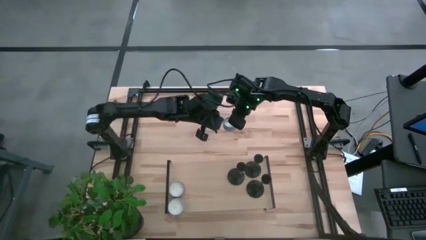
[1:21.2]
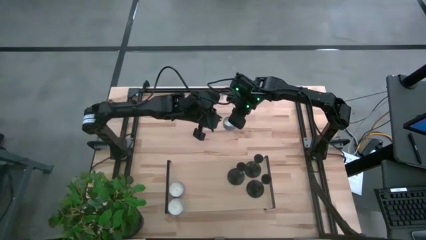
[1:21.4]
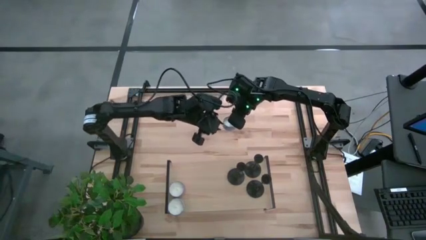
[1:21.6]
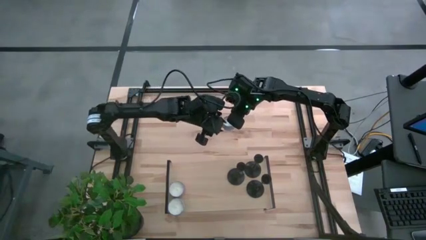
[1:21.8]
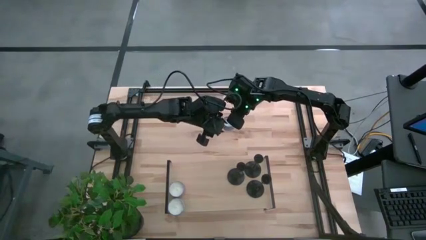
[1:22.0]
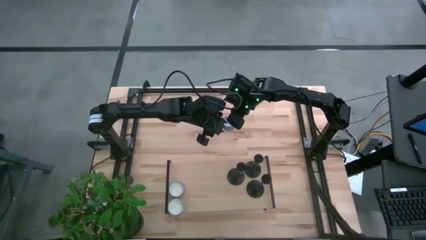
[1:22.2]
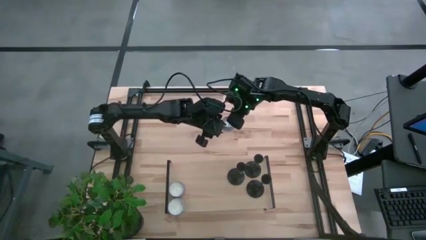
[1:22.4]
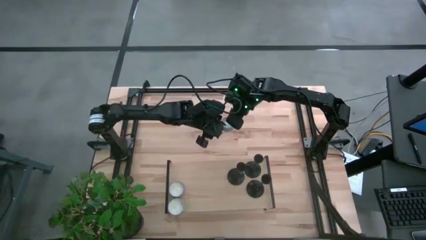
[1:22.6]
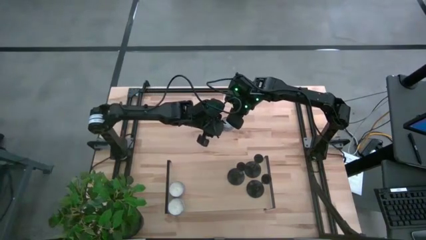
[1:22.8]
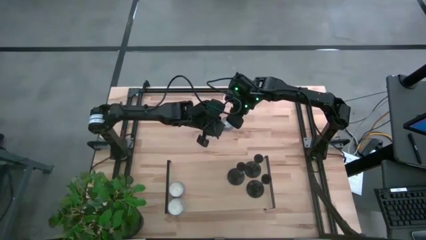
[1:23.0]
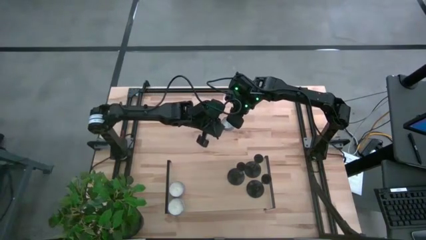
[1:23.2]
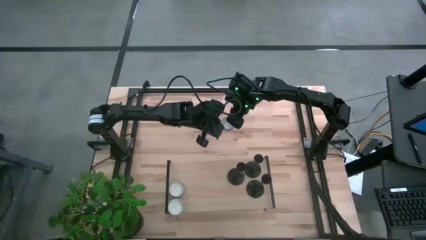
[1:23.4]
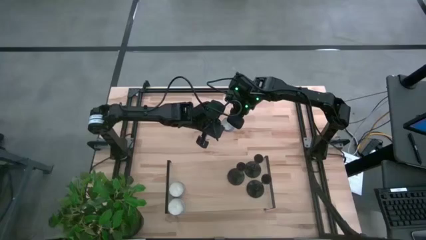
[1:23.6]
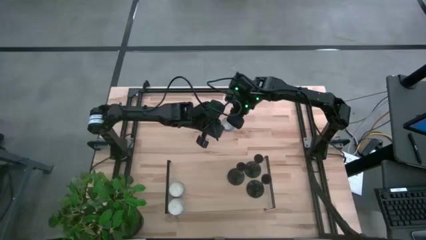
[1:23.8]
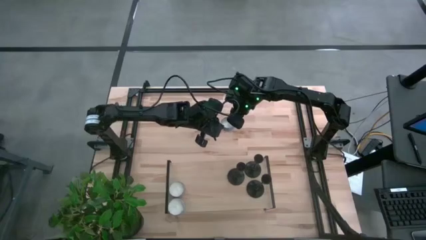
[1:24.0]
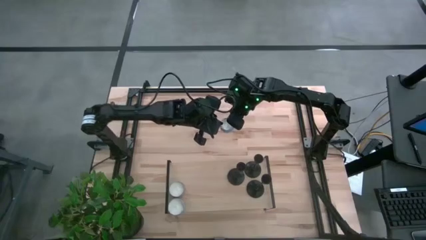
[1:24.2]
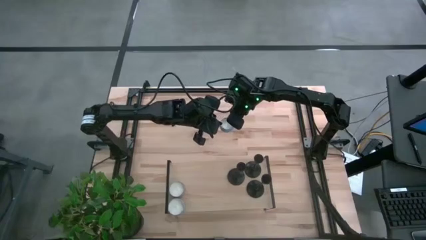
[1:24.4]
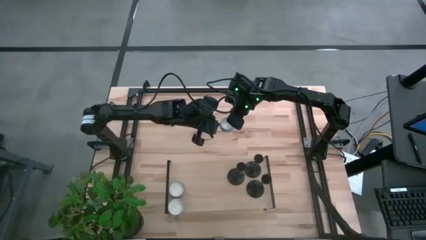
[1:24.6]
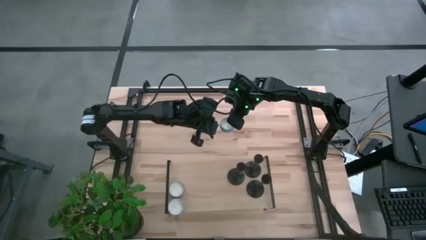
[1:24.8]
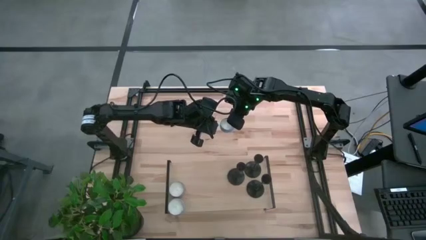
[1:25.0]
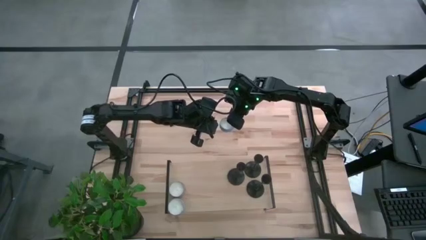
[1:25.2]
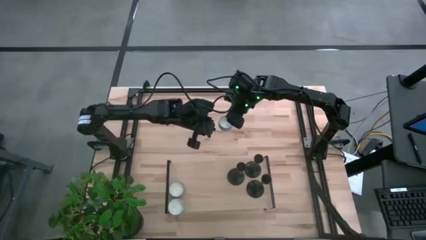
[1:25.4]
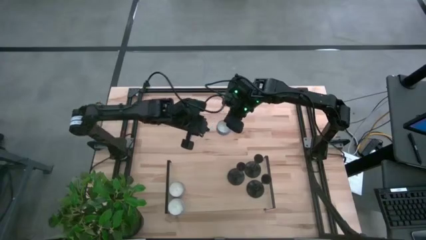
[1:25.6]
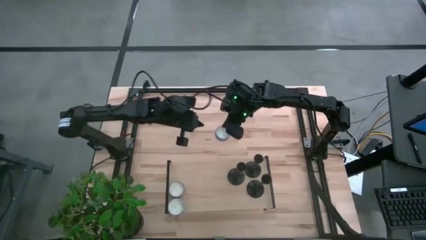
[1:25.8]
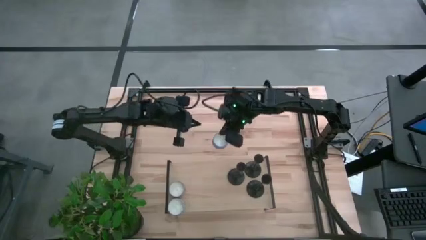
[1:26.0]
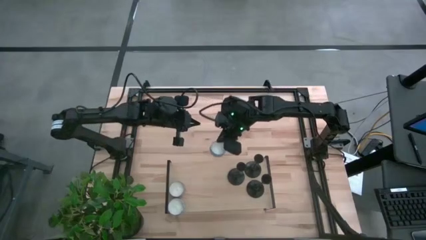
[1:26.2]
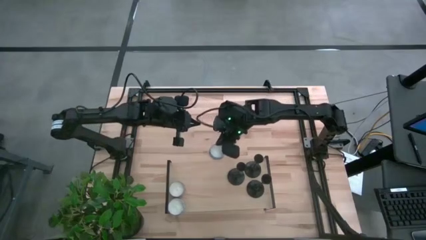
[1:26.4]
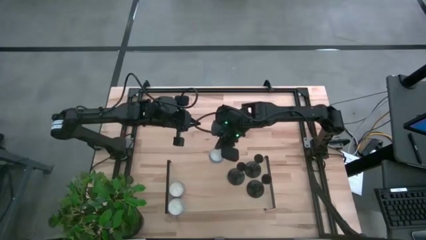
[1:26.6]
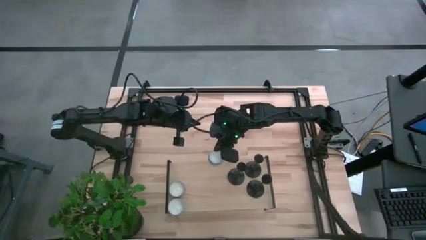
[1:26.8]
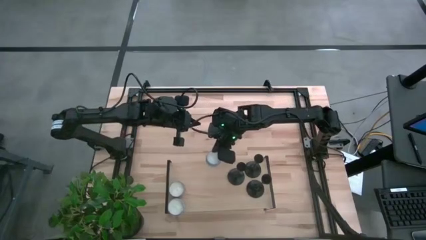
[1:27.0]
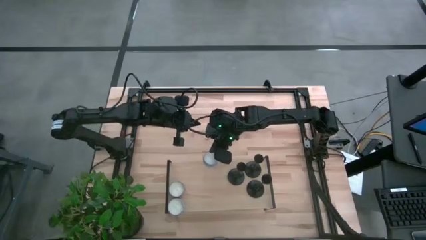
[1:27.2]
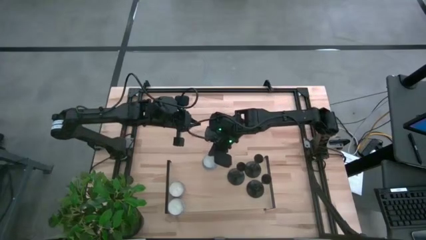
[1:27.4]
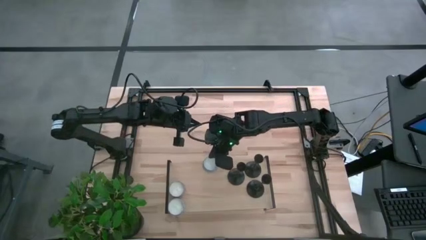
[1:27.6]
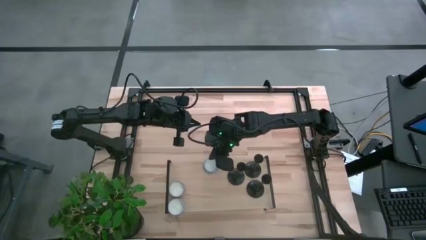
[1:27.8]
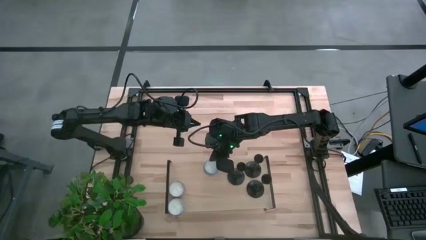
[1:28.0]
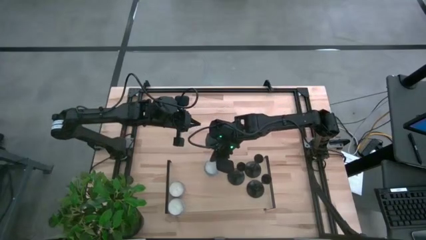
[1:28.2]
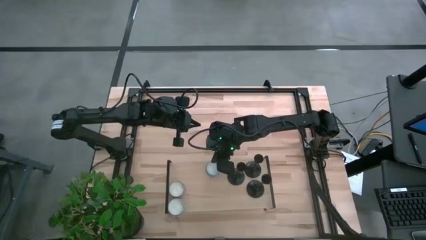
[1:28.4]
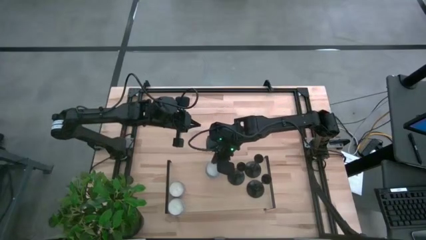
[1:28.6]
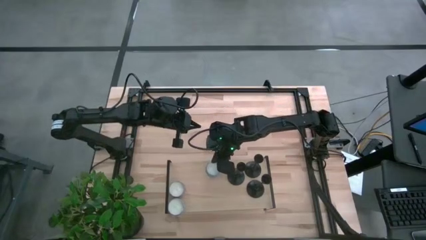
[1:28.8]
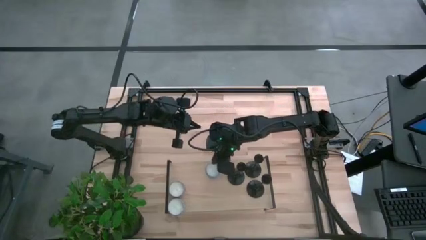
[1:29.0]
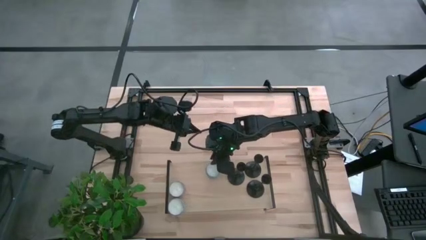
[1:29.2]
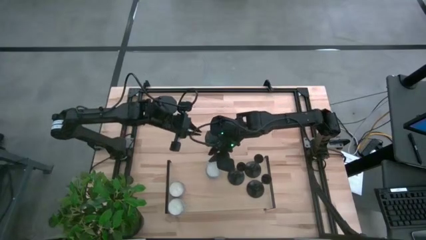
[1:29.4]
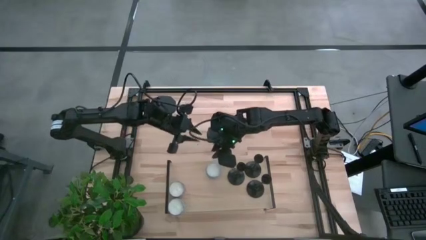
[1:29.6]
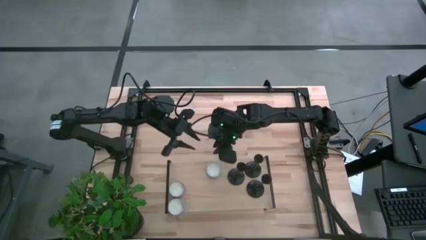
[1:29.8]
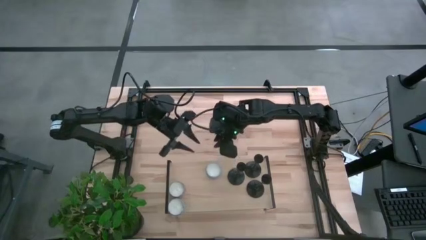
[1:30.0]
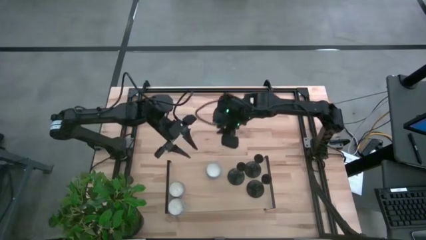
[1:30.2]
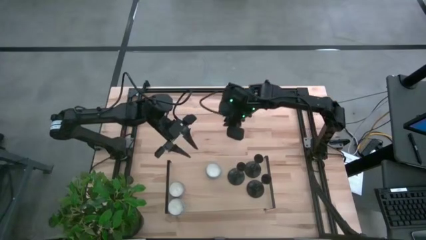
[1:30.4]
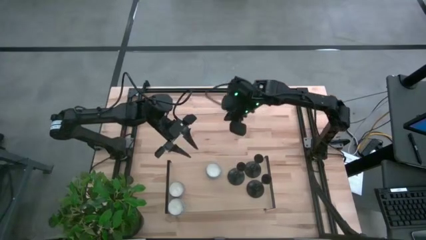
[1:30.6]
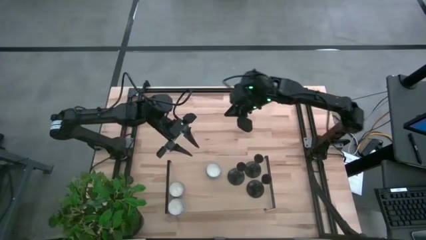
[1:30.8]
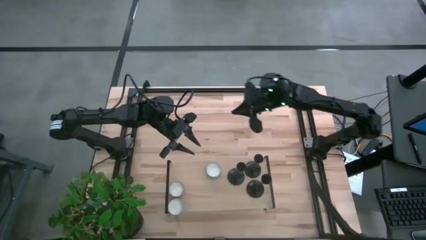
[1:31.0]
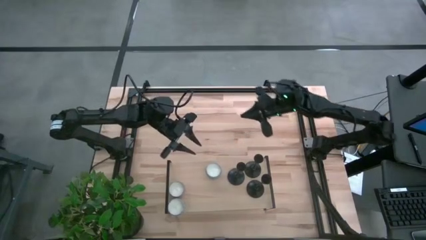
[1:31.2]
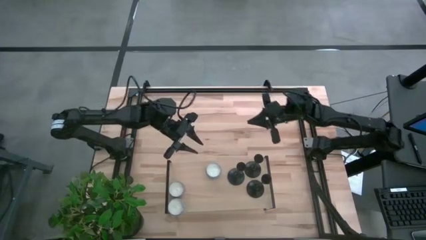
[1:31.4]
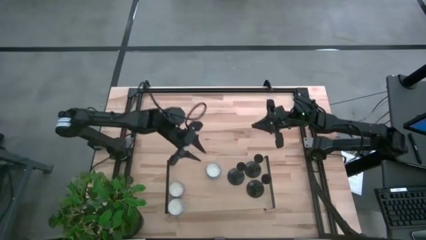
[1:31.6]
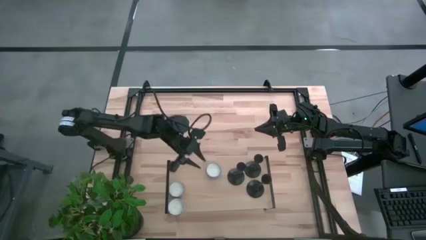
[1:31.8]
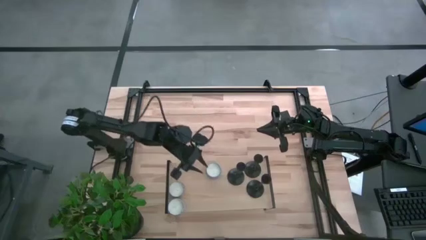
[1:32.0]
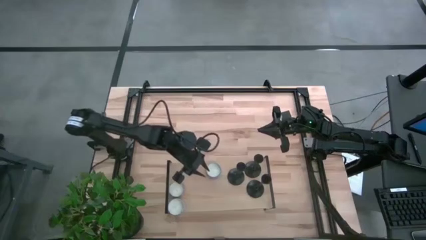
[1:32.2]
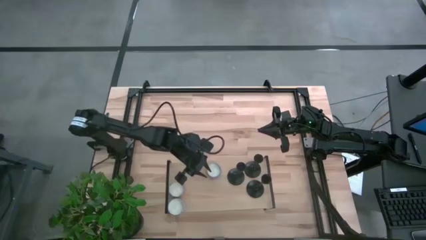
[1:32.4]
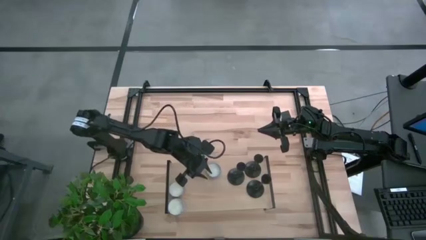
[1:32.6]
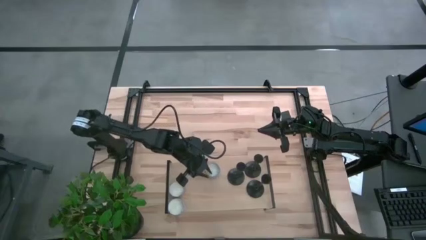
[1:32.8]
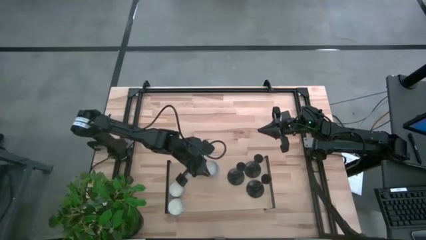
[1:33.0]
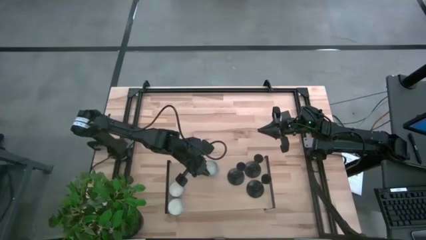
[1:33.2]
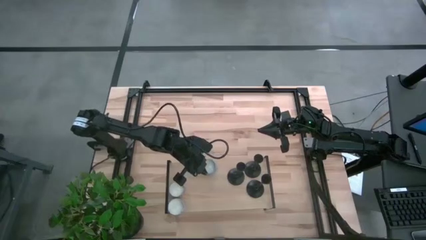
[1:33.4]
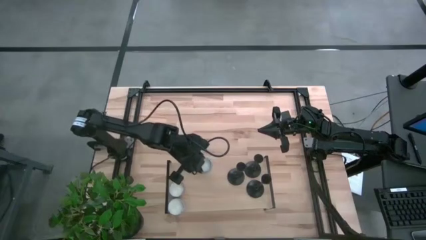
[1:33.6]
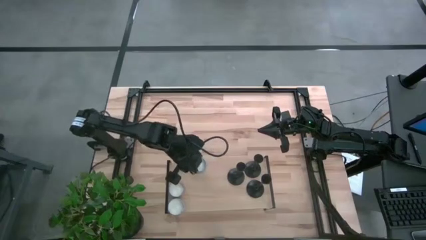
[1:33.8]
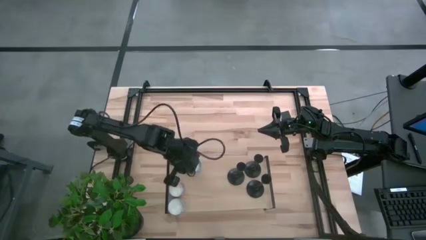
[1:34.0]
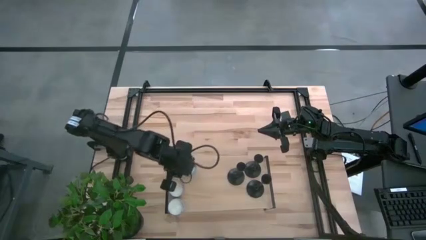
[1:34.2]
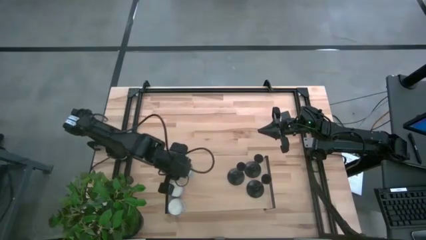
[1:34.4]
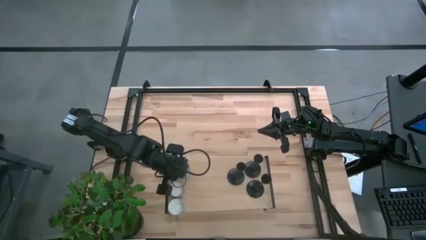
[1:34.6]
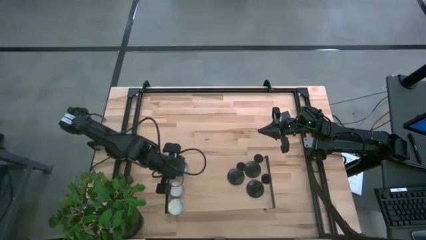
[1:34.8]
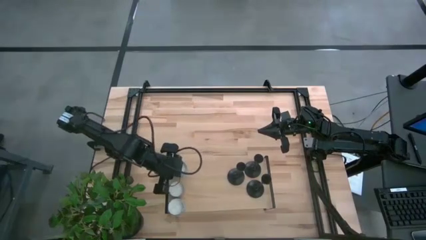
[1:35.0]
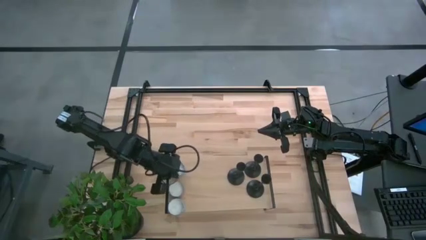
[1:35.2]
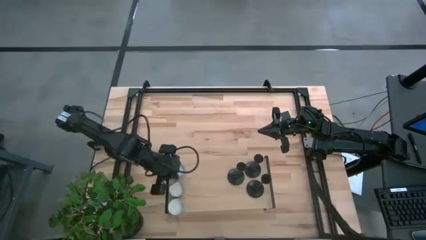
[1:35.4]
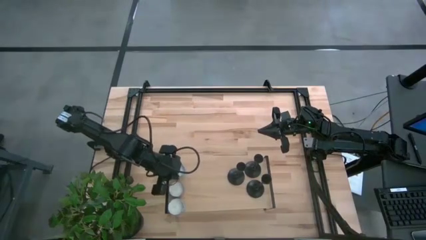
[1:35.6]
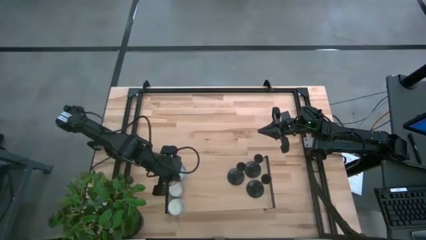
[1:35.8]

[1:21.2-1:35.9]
Task: Pick & Place candle stick holders
Put the scented candle on the shelf

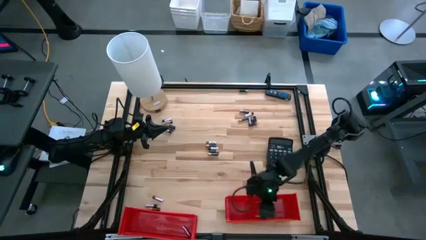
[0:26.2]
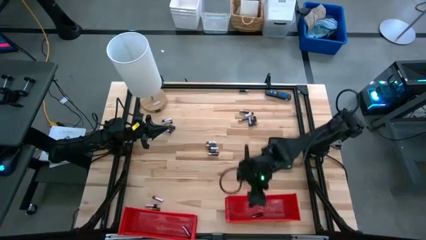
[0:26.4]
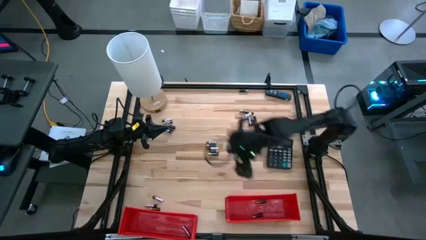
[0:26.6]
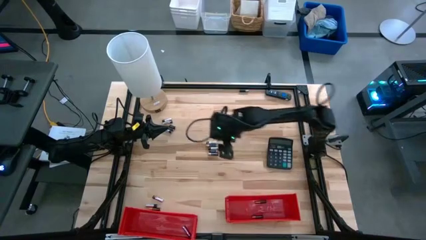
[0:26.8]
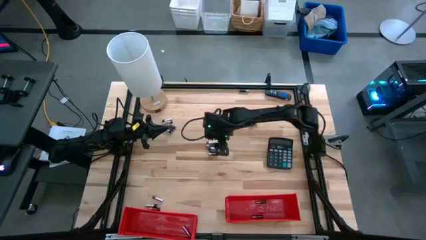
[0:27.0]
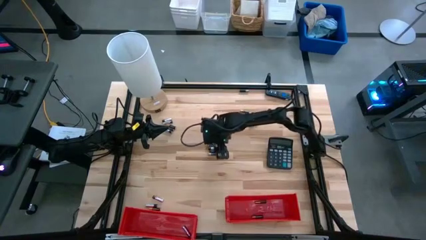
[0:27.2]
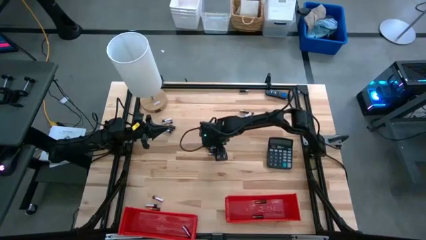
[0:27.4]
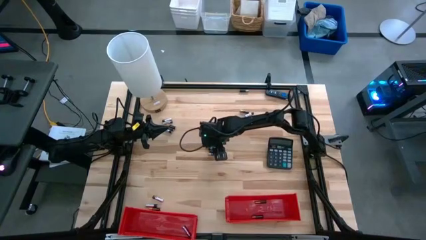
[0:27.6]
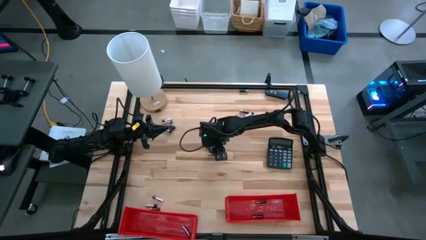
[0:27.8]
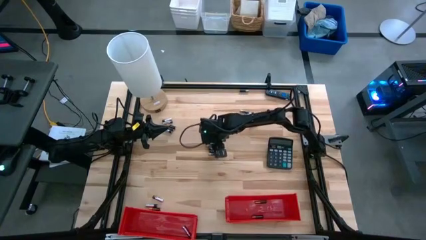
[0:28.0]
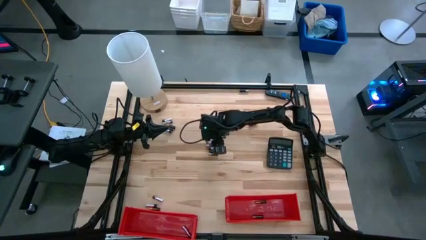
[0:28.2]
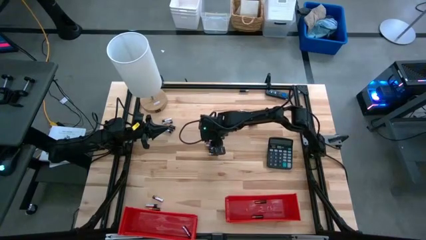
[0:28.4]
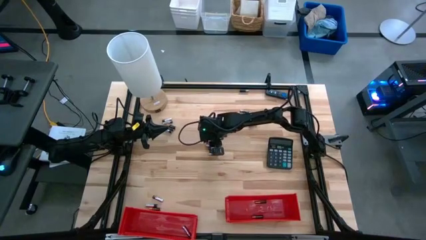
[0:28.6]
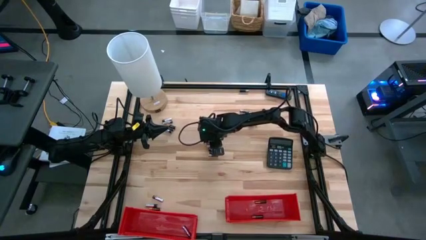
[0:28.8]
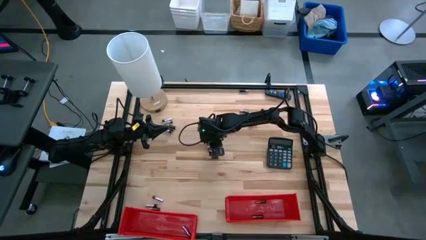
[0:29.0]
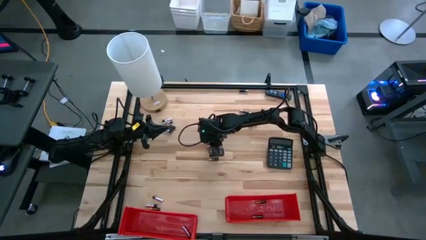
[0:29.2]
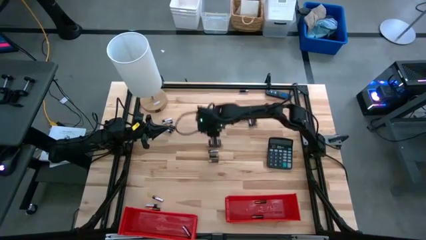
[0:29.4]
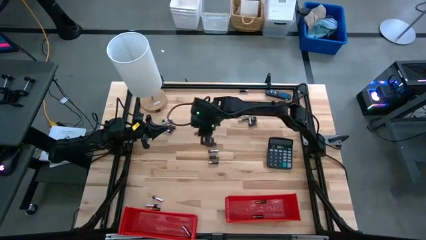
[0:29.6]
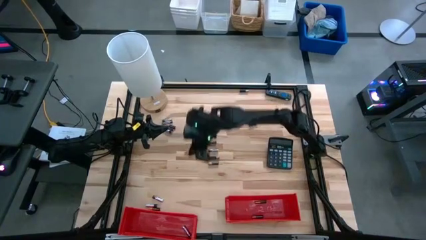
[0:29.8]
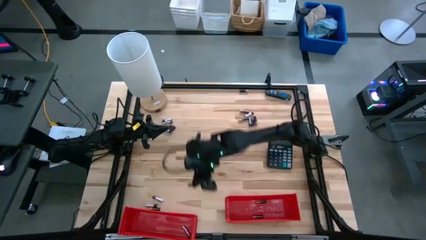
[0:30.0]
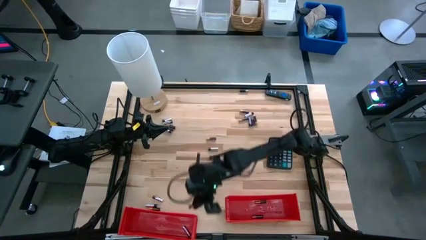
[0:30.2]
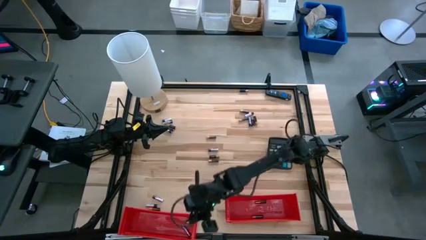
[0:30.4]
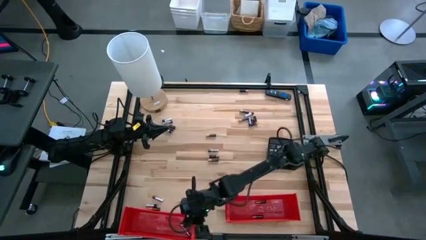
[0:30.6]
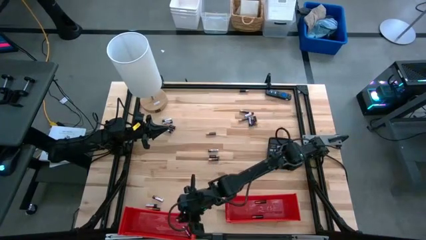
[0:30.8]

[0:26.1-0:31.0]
Task: Sort batteries
Put the silver battery into the left red bin
